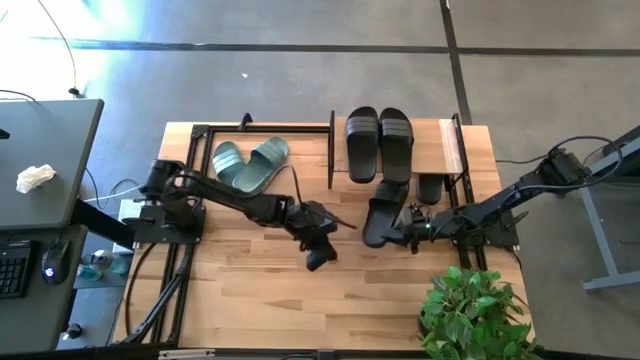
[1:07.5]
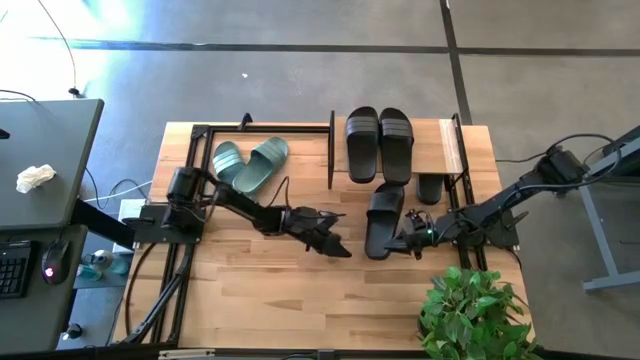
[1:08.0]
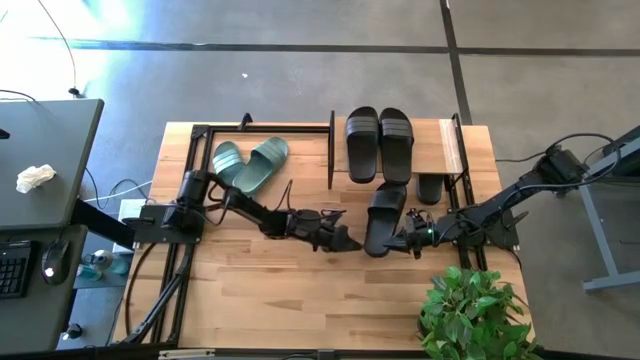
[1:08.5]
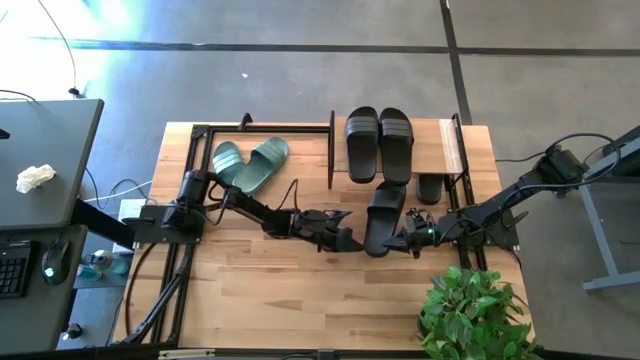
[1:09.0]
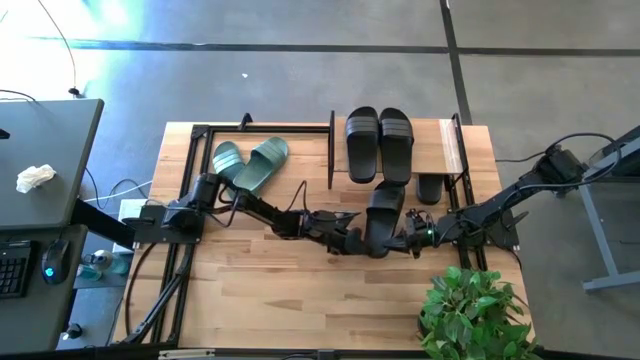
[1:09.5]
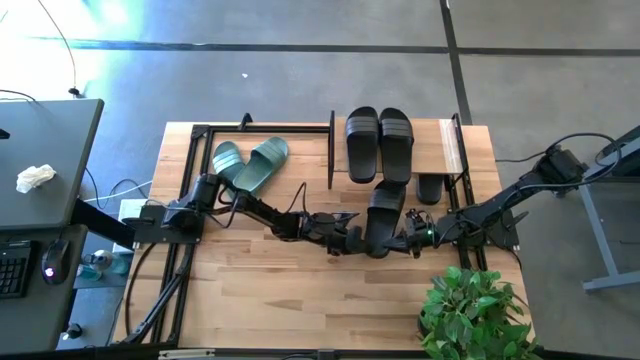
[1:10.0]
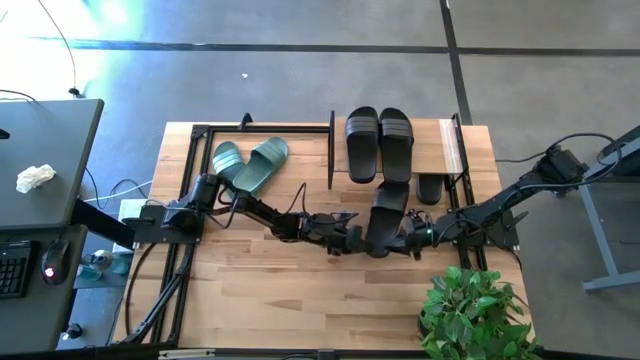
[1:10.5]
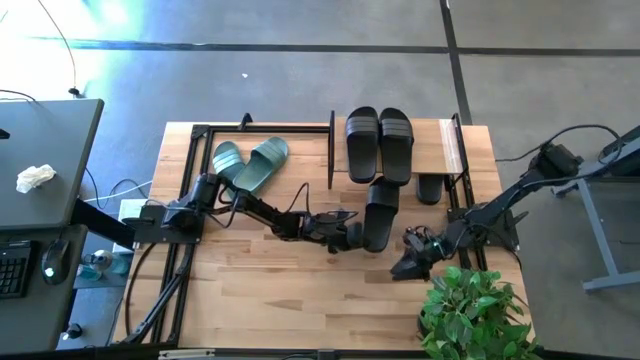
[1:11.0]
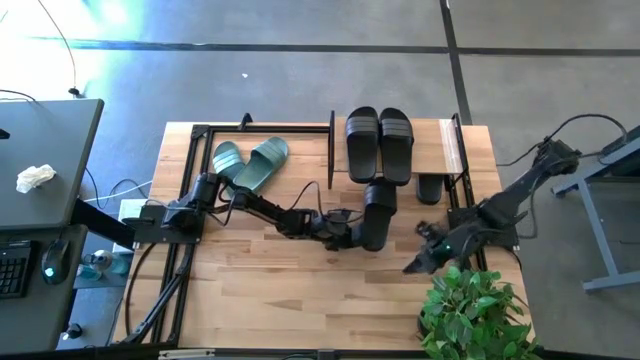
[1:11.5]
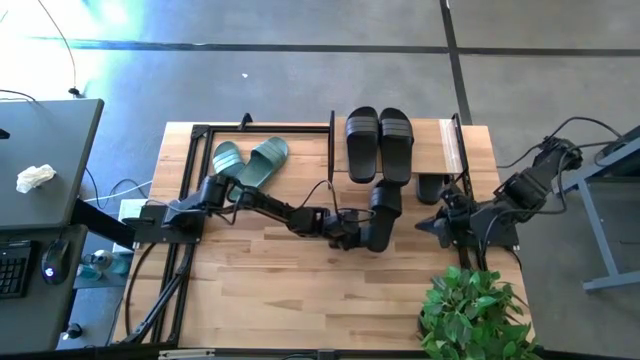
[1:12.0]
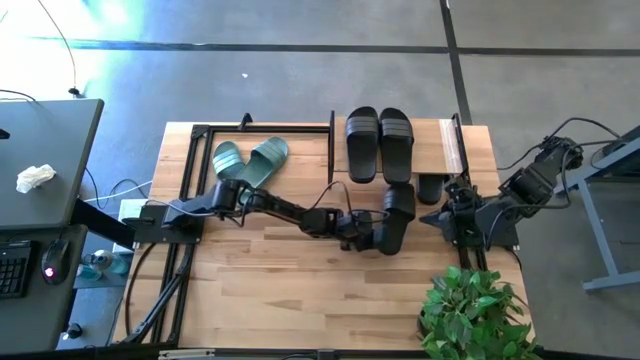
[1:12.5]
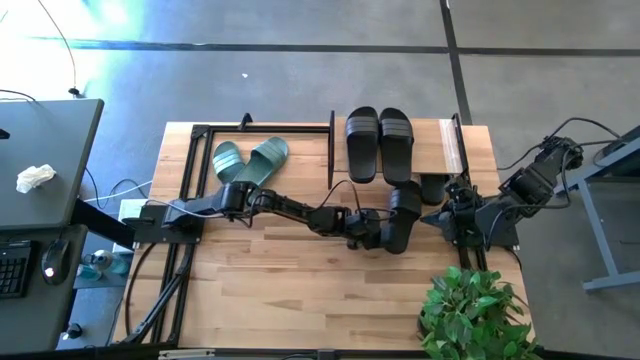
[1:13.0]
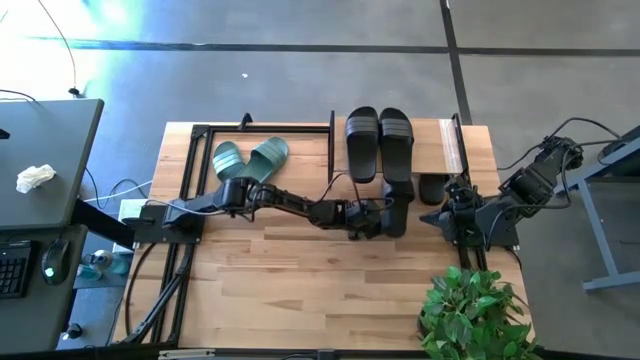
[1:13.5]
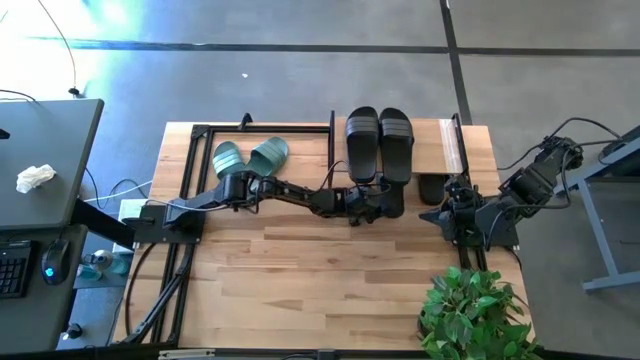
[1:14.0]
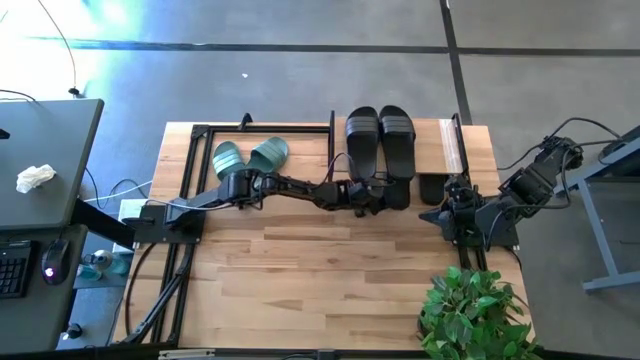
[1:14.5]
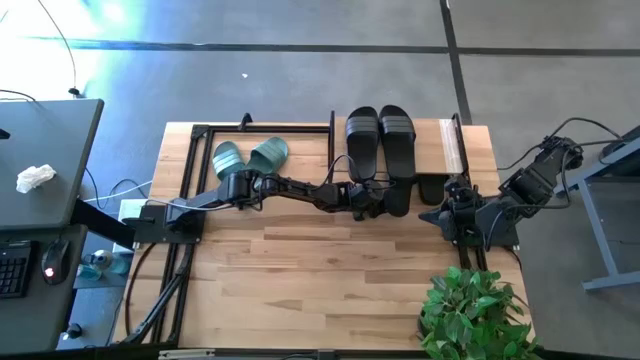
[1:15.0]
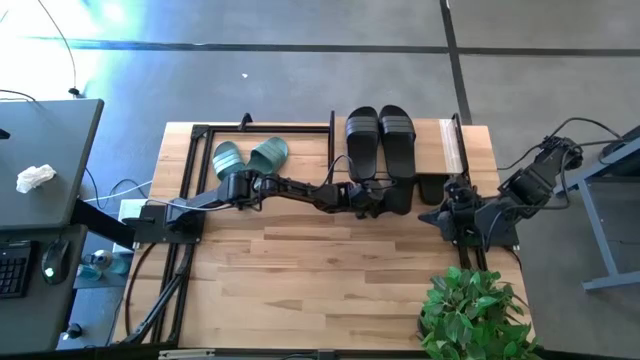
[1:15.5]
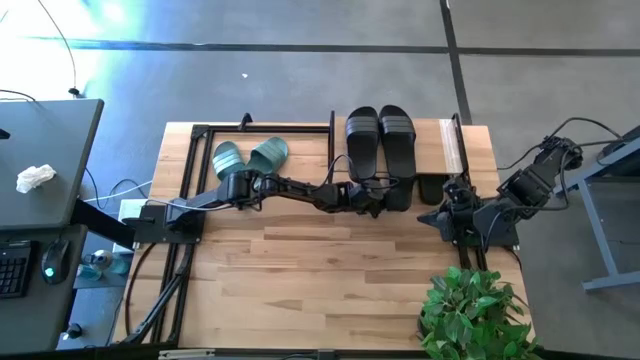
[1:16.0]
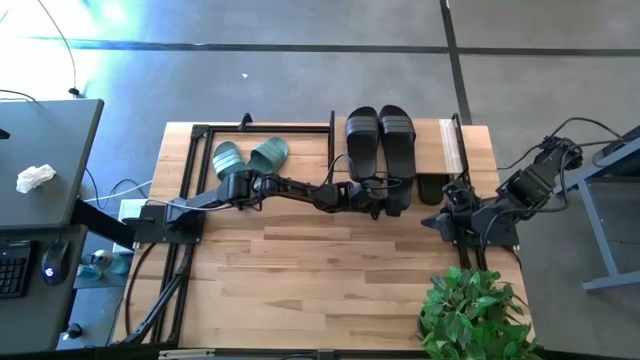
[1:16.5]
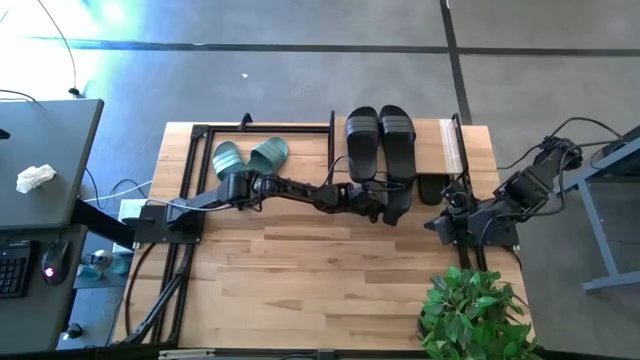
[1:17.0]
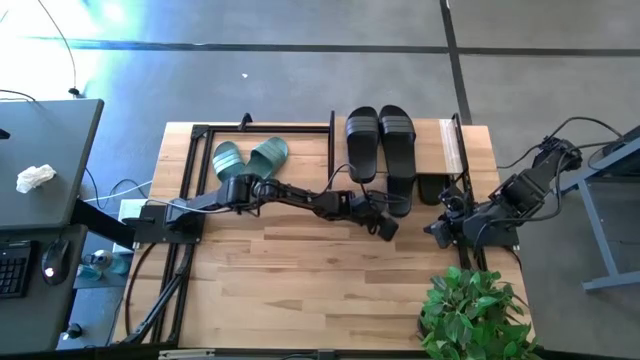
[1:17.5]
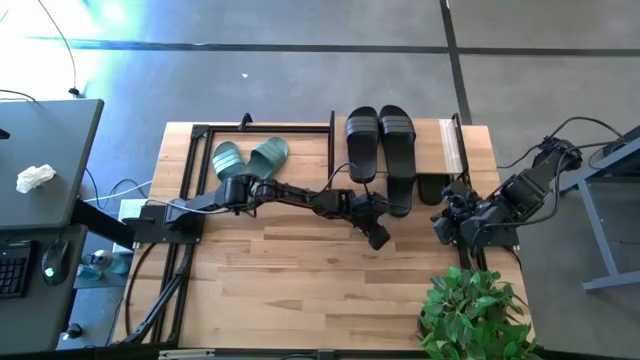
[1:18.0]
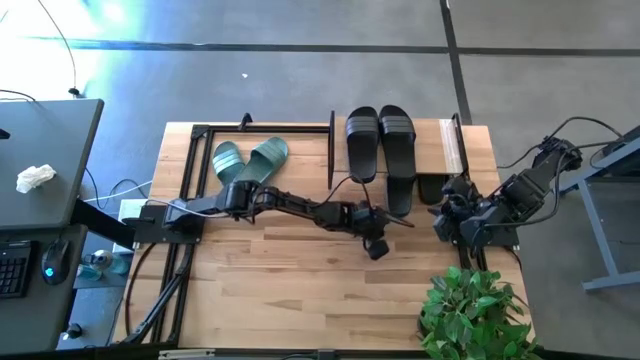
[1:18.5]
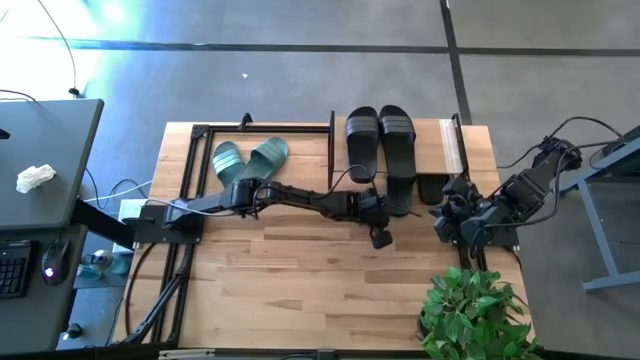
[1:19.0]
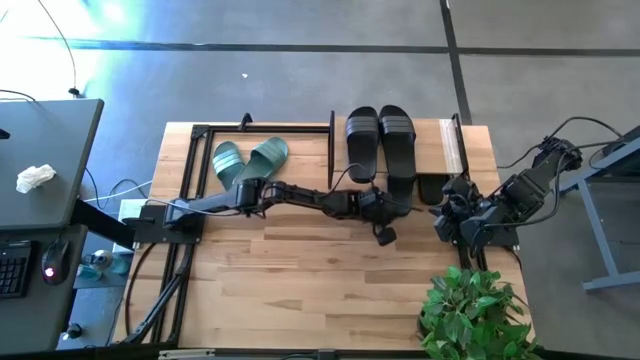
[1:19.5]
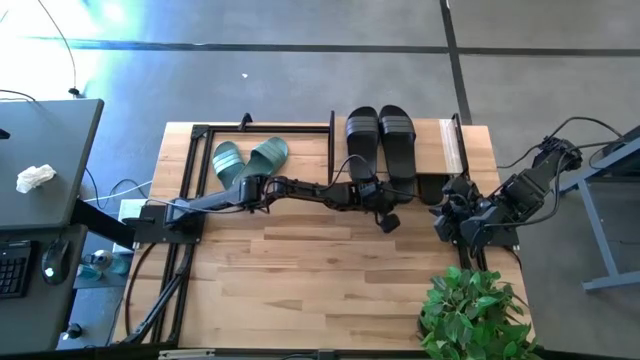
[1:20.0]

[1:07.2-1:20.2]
Task: Pick and place slides into the shelf
Put the black slipper under the shelf

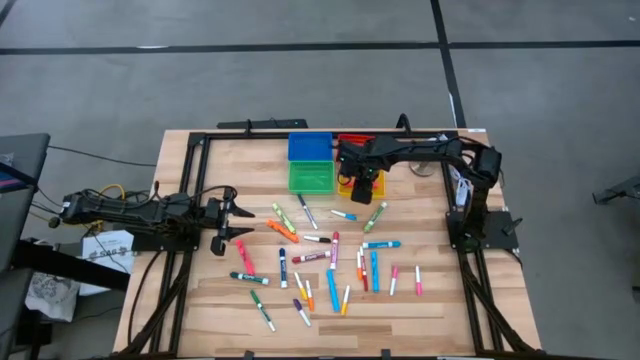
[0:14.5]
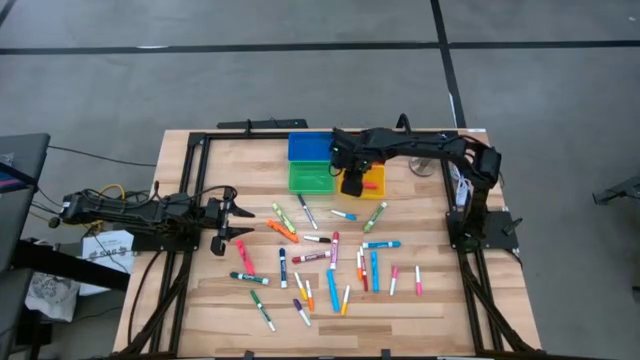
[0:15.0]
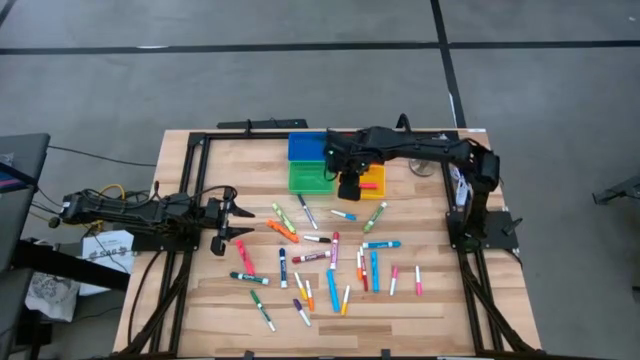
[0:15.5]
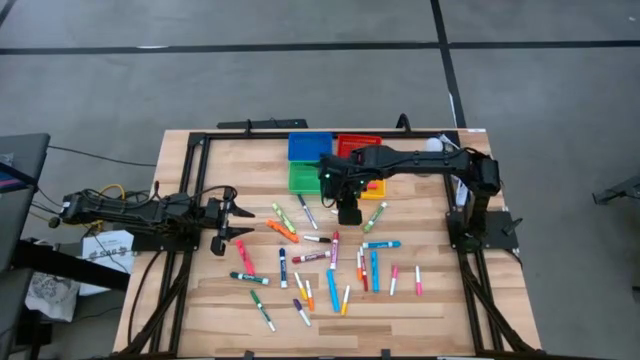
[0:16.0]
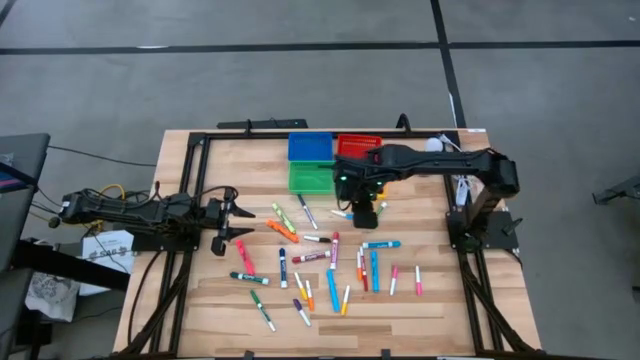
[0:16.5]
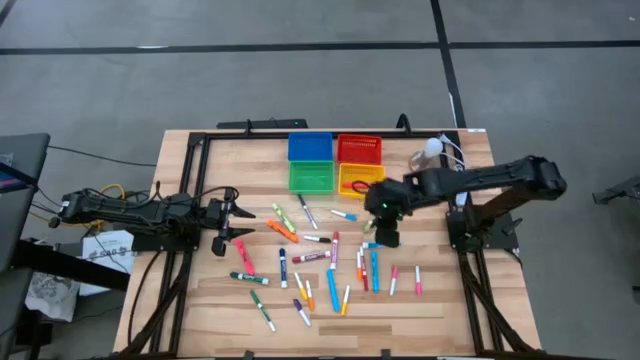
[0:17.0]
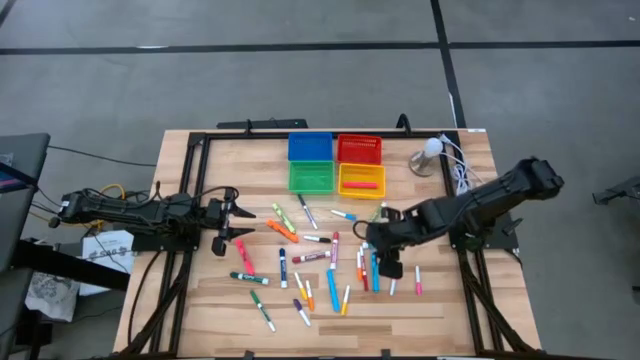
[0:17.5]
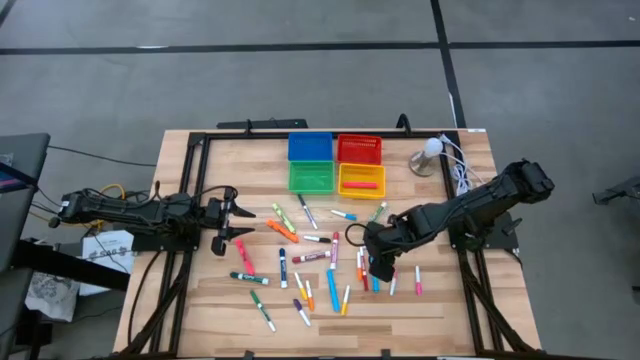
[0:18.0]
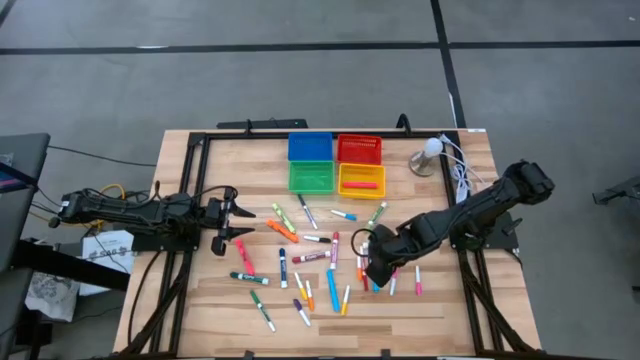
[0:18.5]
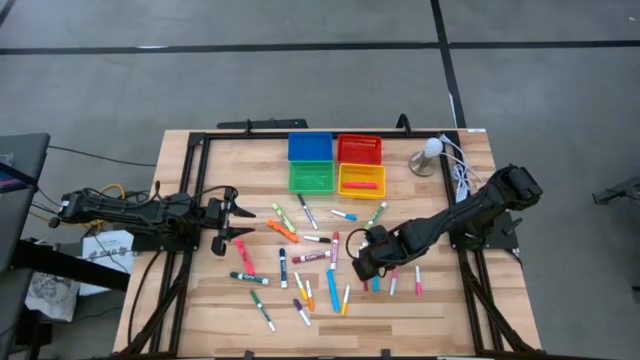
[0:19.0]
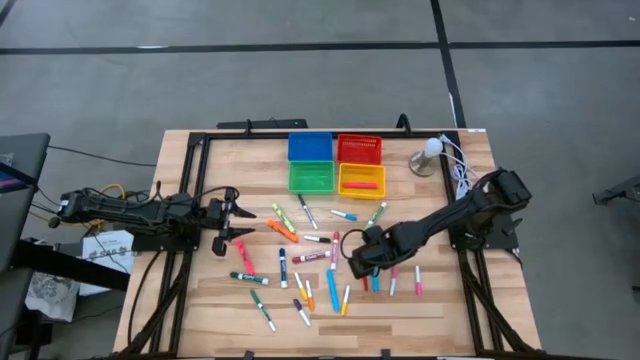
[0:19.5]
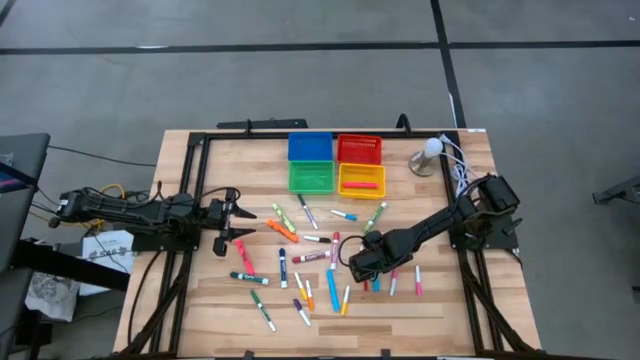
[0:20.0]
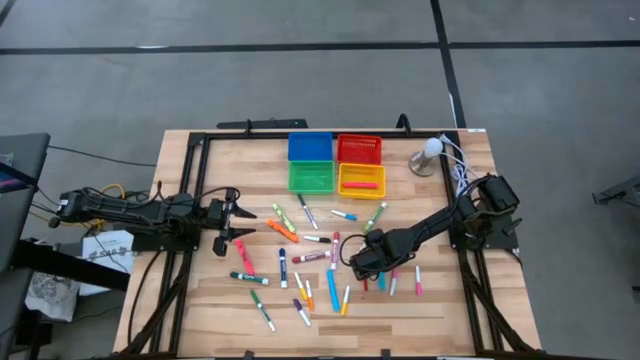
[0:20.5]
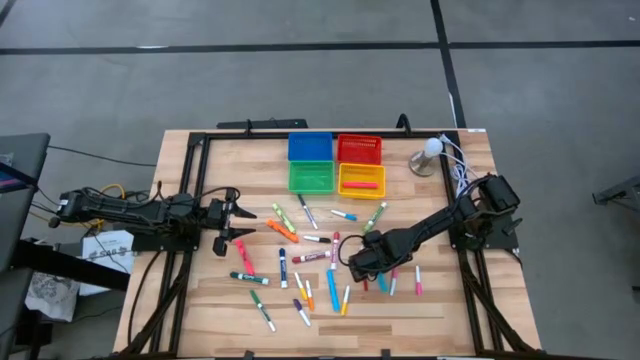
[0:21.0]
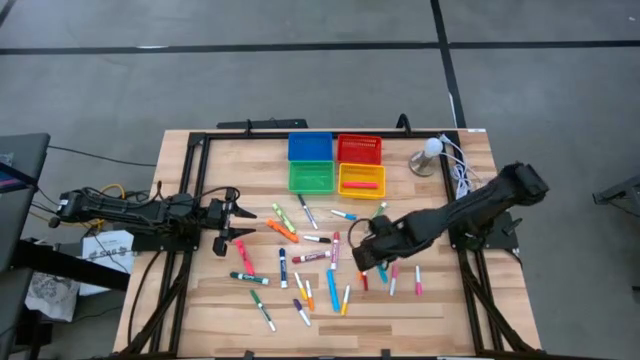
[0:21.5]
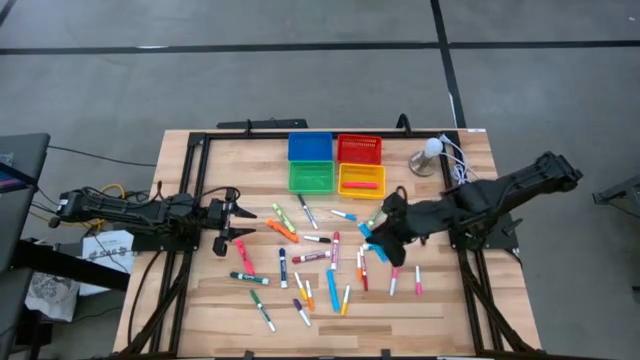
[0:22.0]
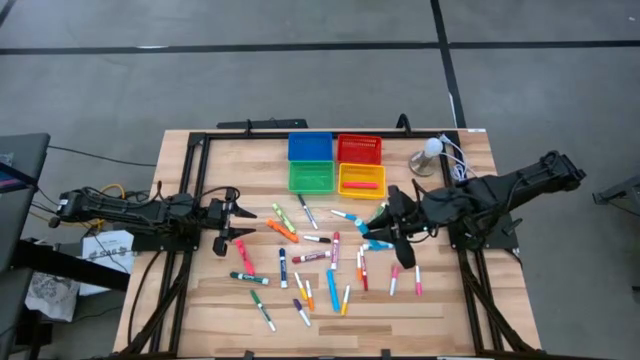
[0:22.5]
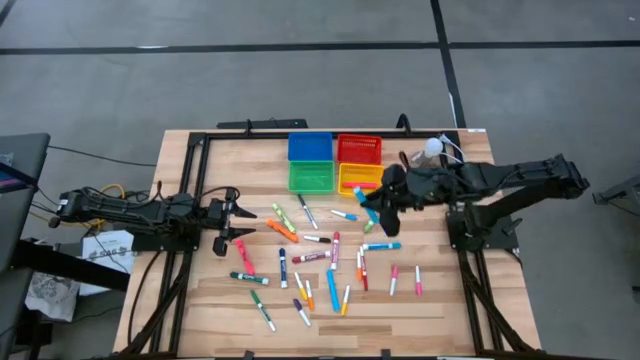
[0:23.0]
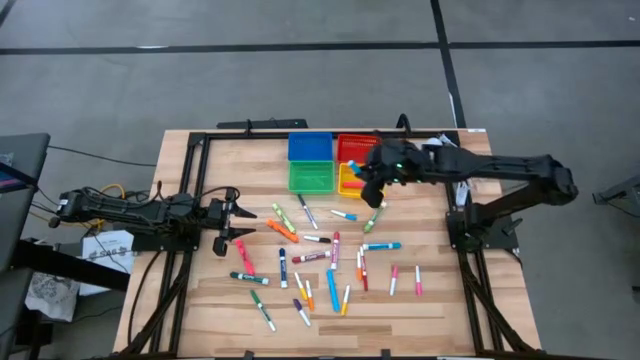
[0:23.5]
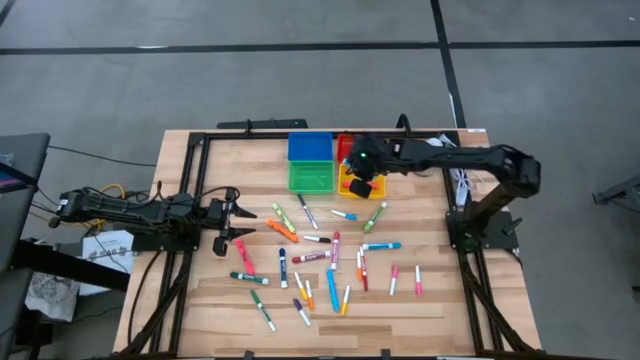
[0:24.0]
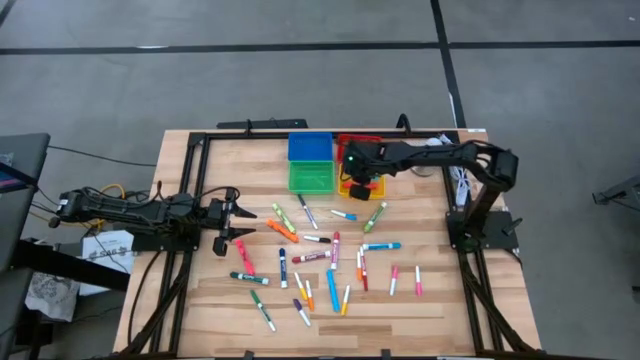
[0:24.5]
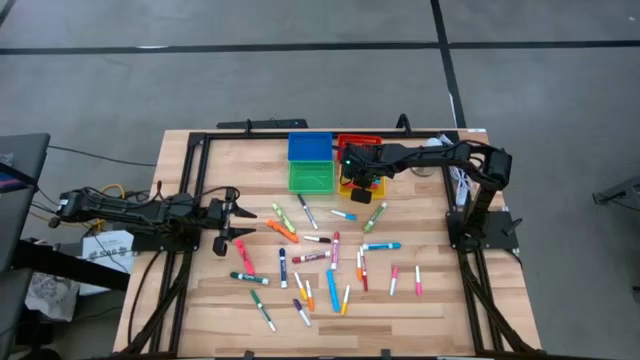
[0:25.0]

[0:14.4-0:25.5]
Task: Pick & Place Markers
Put the right large blue highlighter pen into the yellow bin
